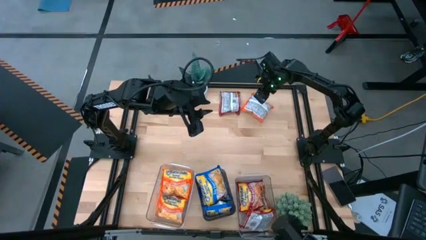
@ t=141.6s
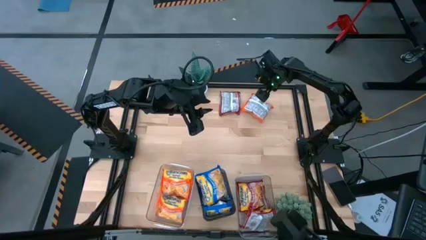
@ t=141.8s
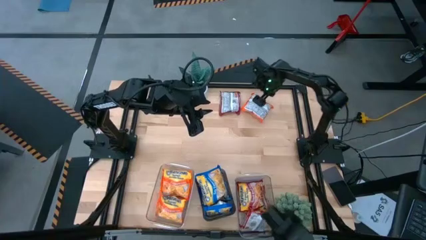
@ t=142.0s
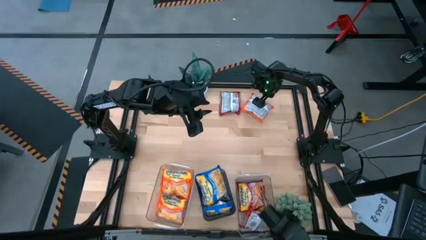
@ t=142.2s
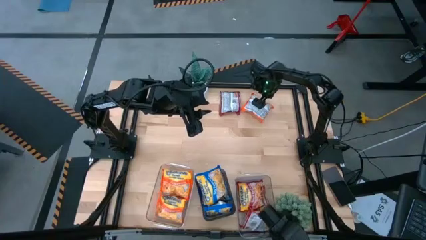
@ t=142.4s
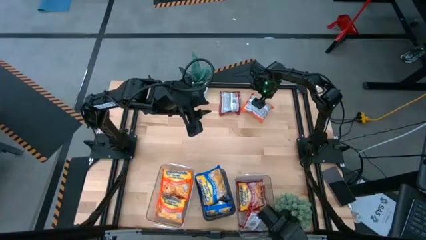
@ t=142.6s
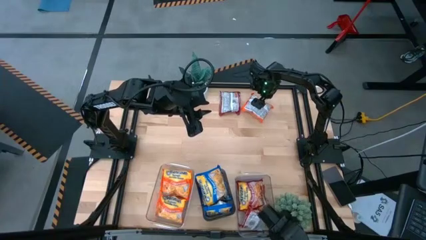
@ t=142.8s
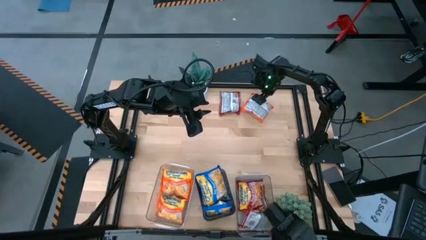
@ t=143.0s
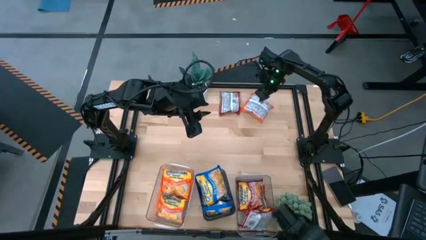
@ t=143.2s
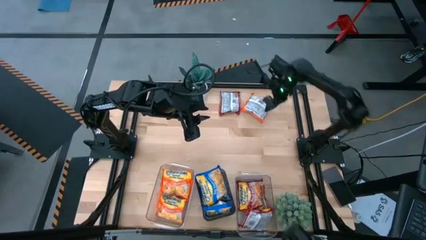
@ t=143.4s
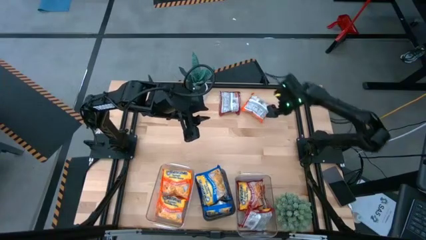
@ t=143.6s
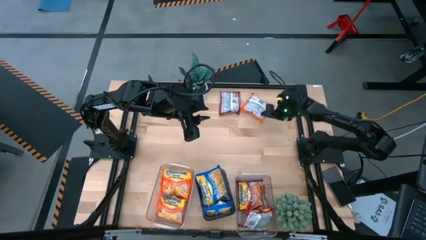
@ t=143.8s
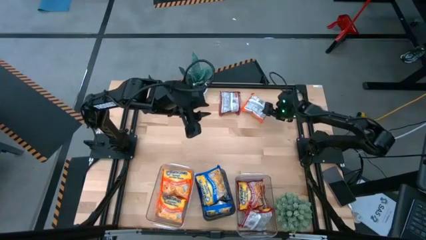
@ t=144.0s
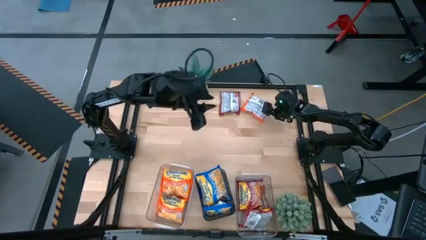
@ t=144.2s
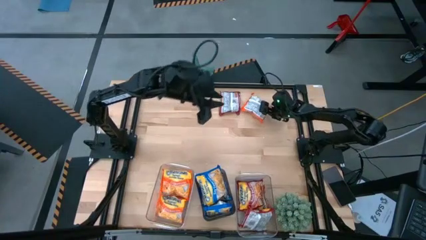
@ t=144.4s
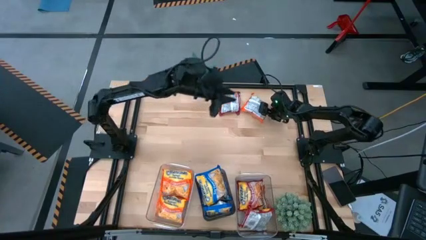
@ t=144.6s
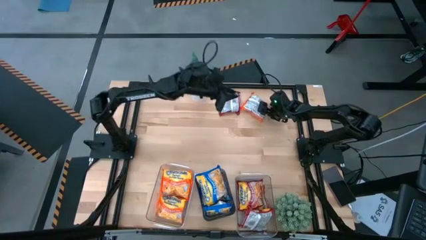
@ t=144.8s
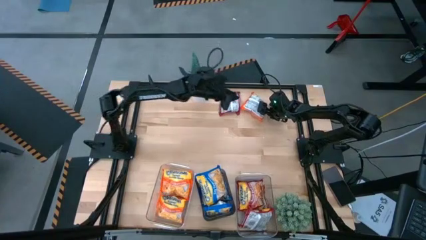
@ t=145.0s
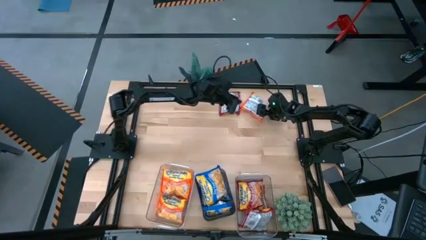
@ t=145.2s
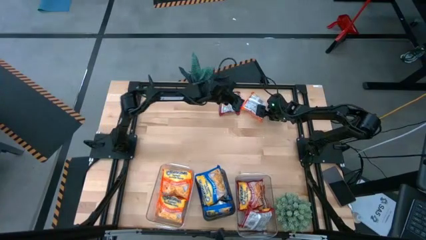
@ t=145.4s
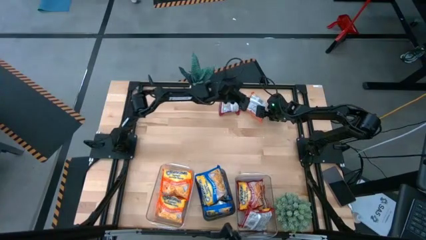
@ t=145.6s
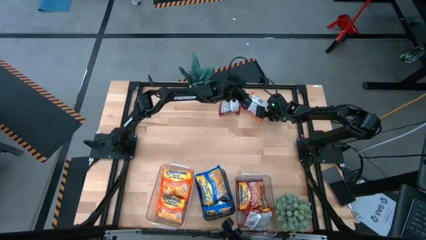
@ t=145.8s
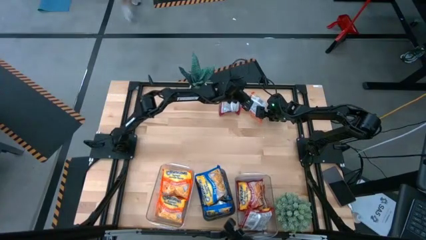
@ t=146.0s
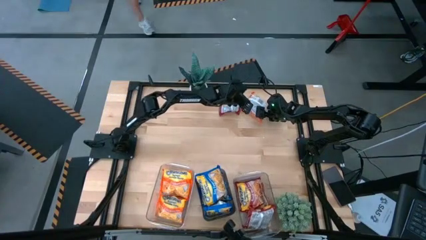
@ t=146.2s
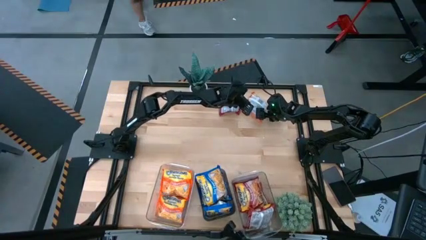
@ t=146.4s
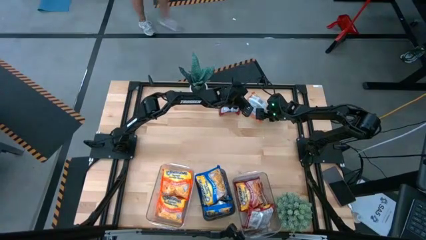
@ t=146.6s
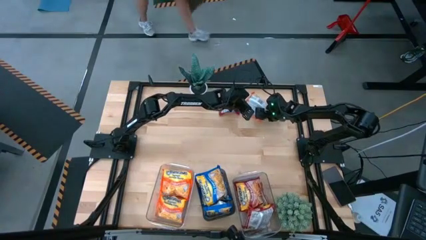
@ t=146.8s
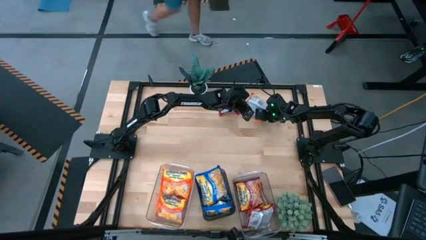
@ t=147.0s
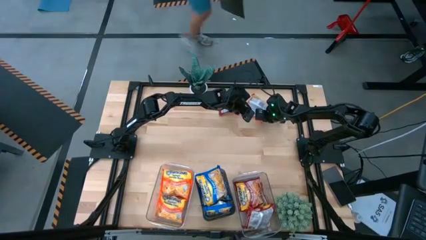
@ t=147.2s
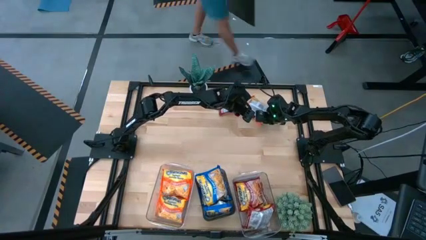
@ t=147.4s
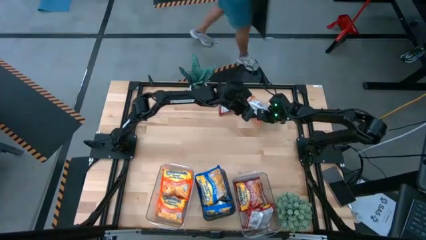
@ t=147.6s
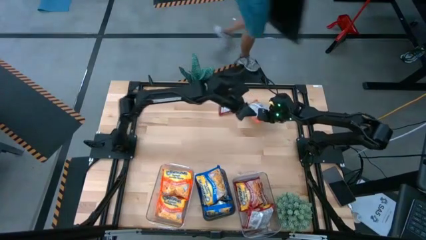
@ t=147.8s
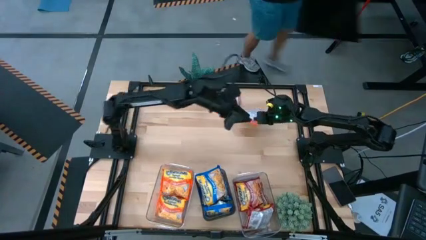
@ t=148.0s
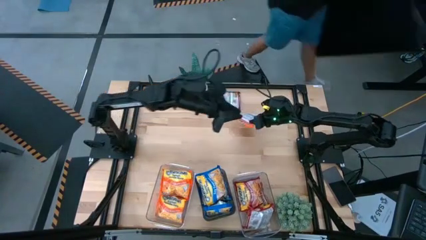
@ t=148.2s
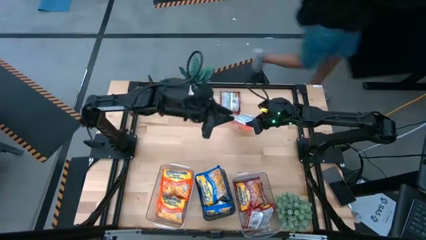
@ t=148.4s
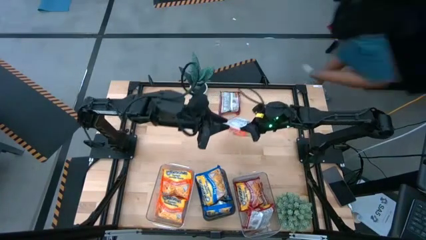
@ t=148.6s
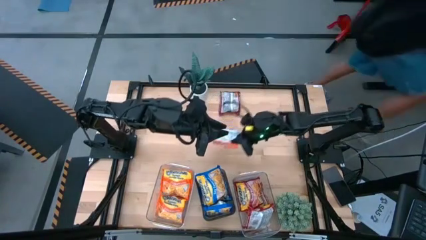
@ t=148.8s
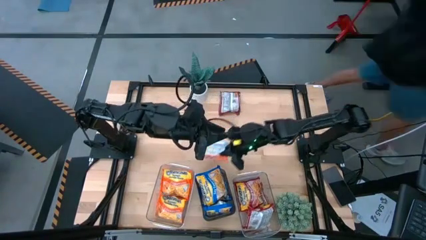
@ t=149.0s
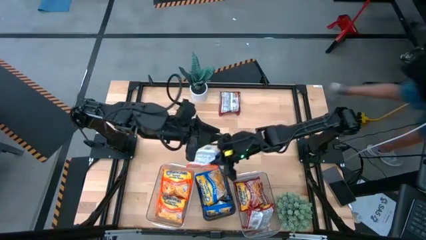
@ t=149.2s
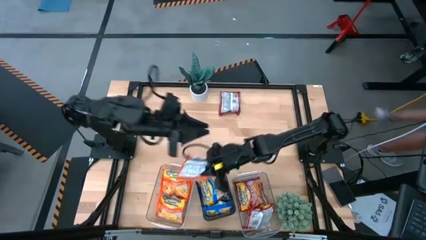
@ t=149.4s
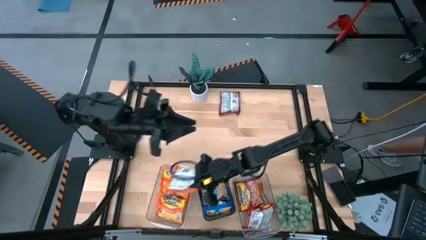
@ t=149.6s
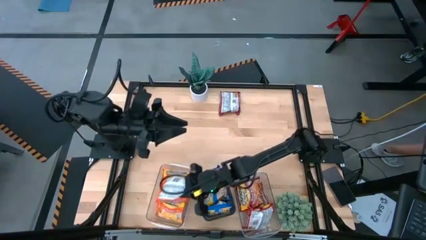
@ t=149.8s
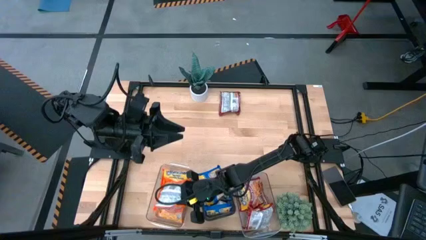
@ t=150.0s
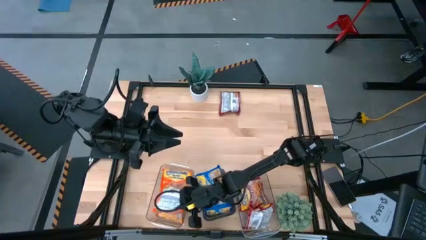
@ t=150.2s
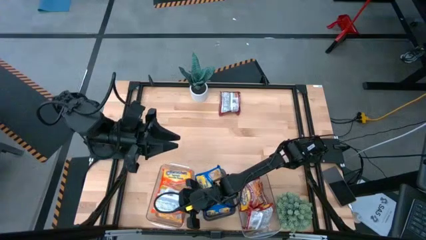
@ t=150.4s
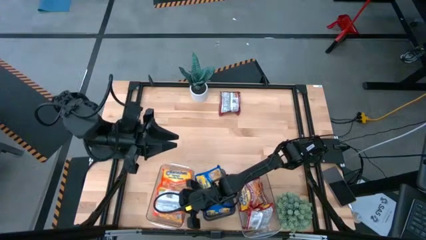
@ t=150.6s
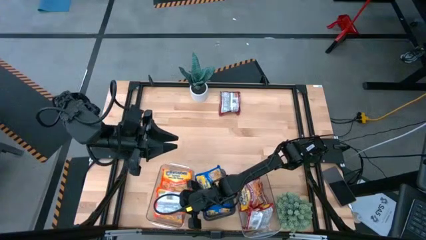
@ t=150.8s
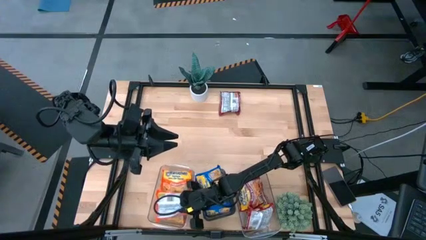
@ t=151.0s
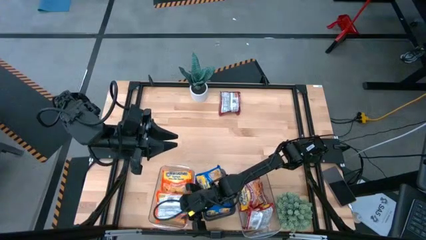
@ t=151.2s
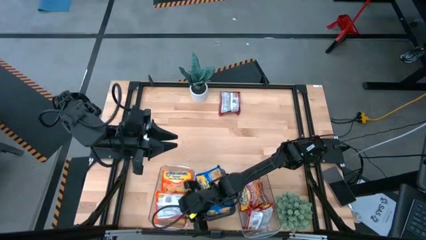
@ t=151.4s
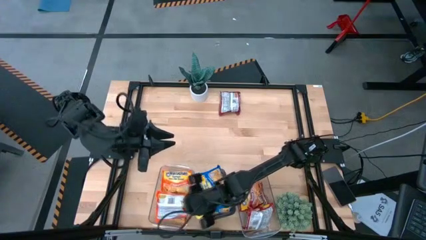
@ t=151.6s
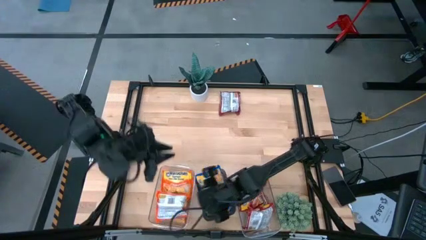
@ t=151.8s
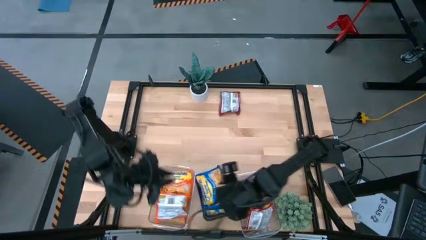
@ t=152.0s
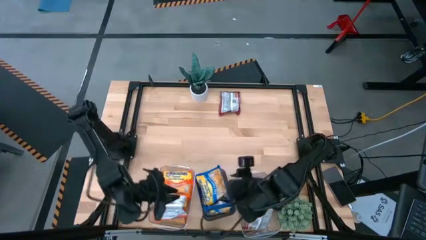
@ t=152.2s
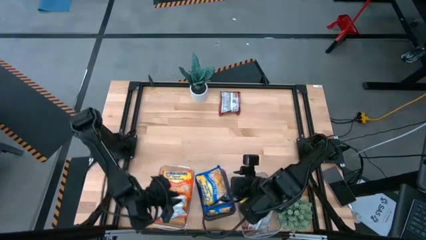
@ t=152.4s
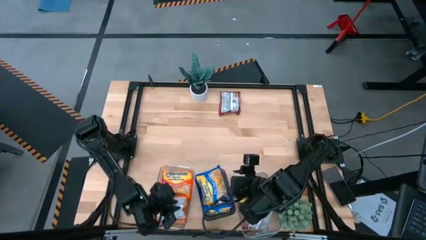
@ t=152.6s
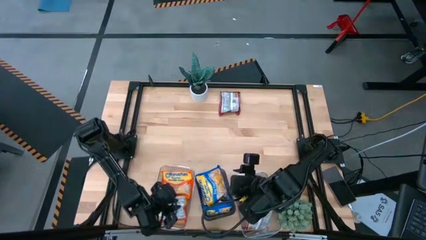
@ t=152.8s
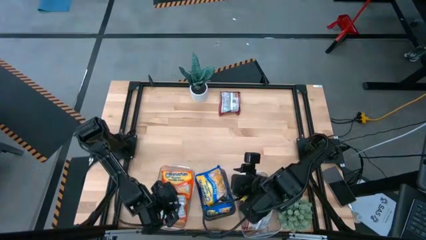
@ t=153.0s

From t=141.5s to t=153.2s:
Task: Sort Maruchan noodles
Put the orange noodle pack into the left transparent bin

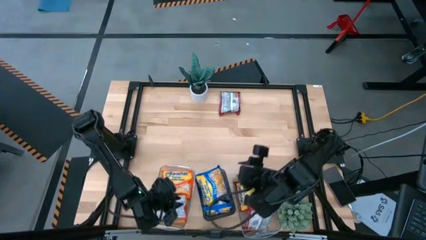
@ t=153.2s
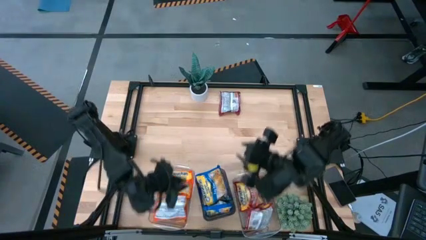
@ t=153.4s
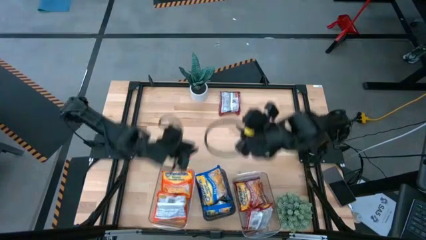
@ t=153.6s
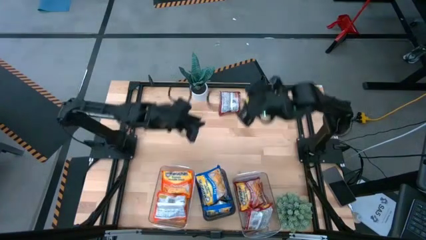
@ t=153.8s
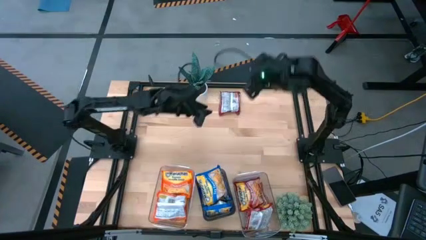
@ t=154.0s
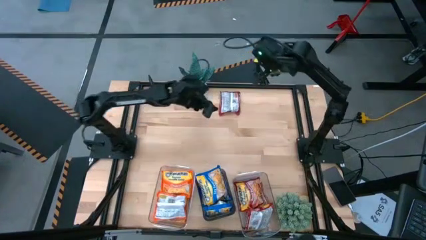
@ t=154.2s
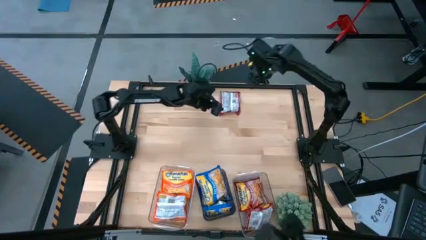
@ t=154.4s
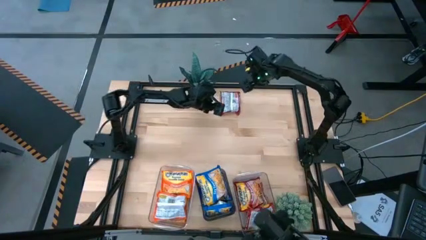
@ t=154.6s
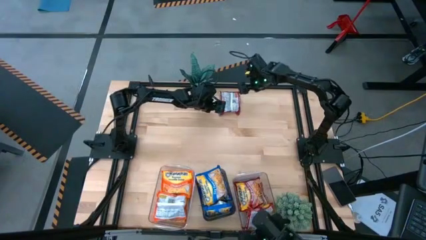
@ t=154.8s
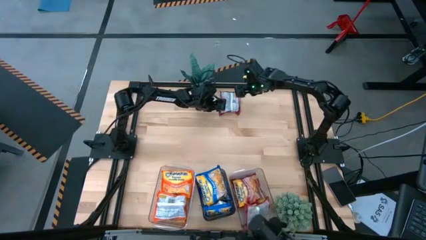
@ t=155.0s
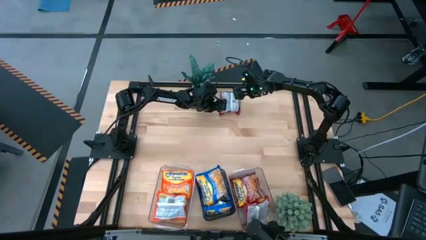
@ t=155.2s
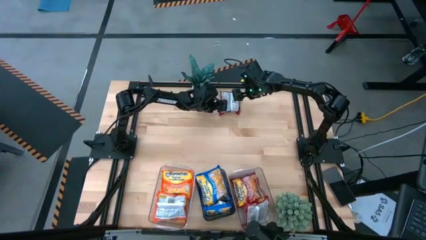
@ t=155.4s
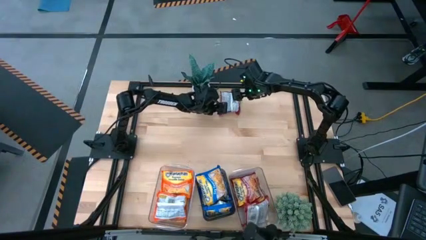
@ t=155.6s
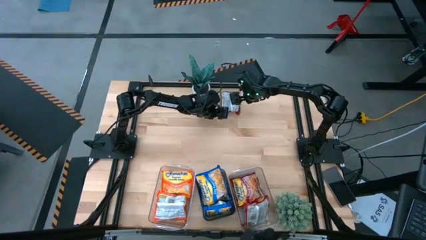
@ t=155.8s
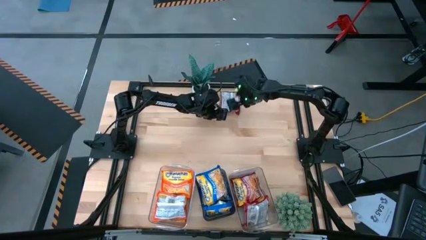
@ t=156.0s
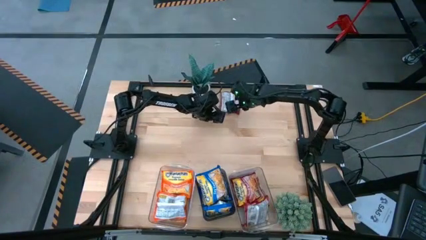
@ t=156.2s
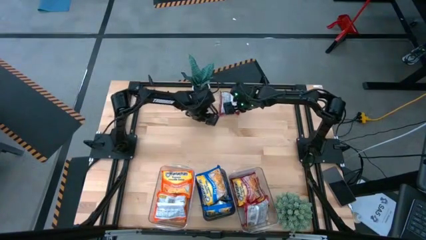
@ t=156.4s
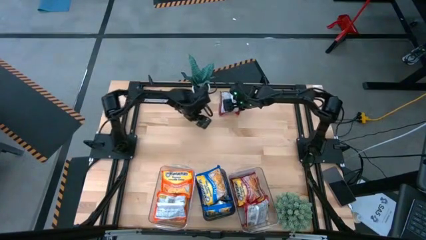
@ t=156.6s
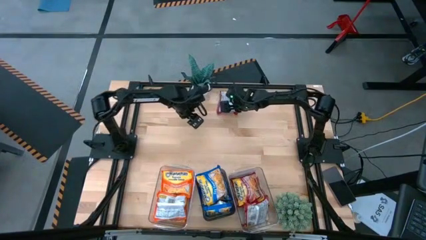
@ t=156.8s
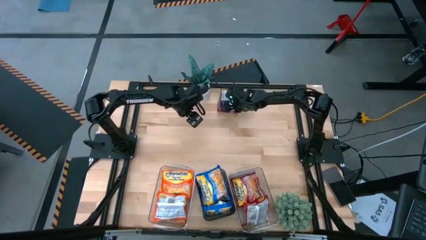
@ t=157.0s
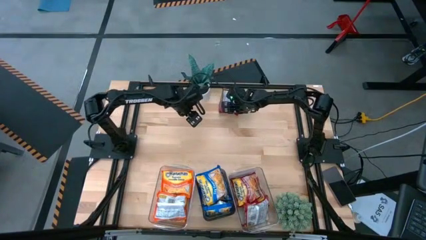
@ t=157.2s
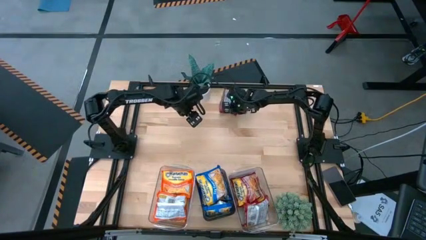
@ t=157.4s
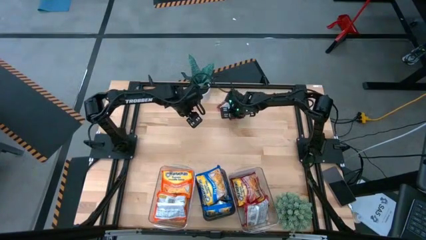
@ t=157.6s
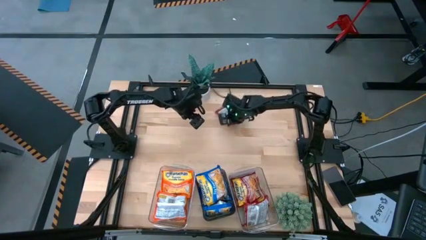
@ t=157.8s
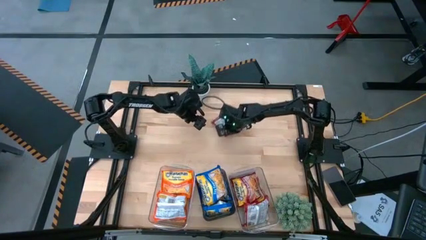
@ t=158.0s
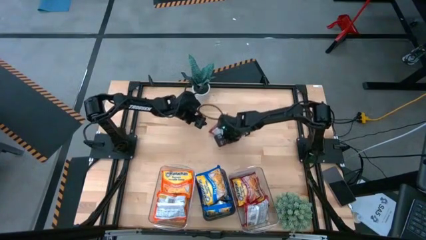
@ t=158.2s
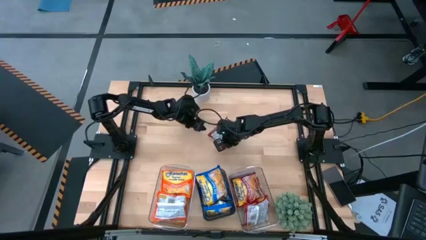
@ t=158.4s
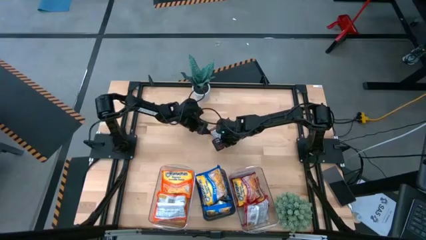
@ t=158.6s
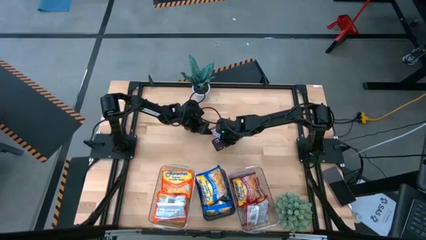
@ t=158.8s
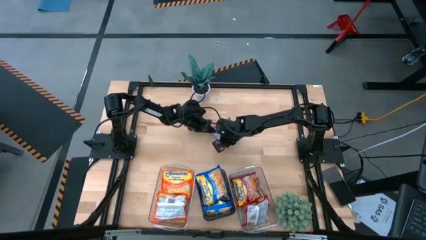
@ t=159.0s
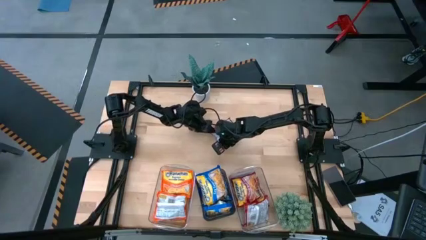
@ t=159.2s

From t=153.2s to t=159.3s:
Put the red noodle pack into the right transparent bin
